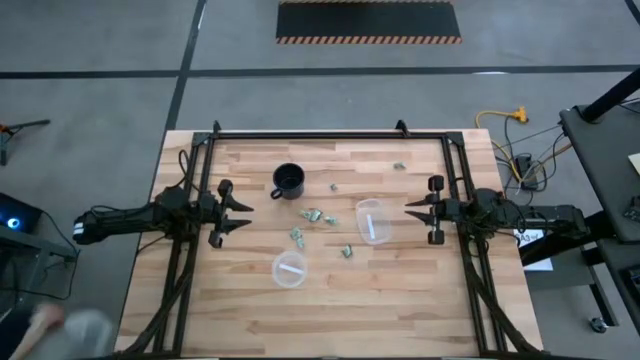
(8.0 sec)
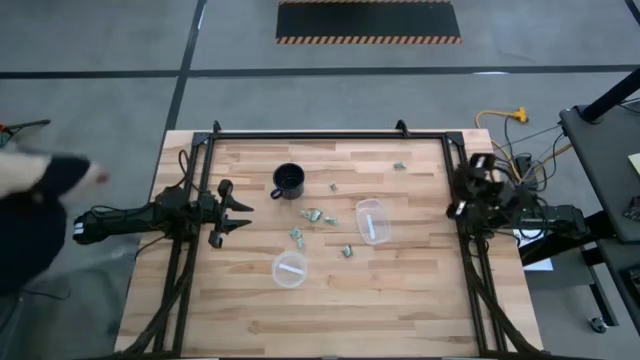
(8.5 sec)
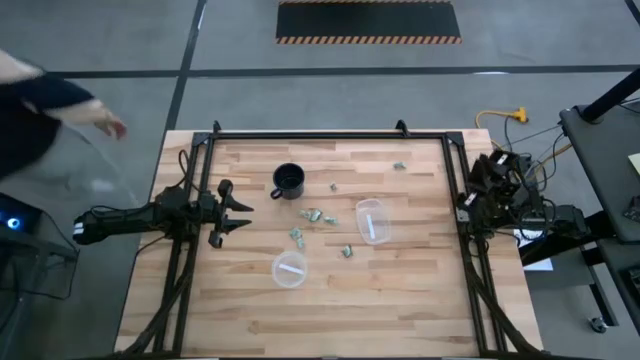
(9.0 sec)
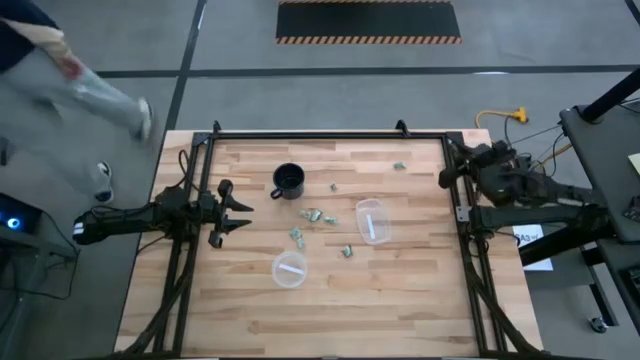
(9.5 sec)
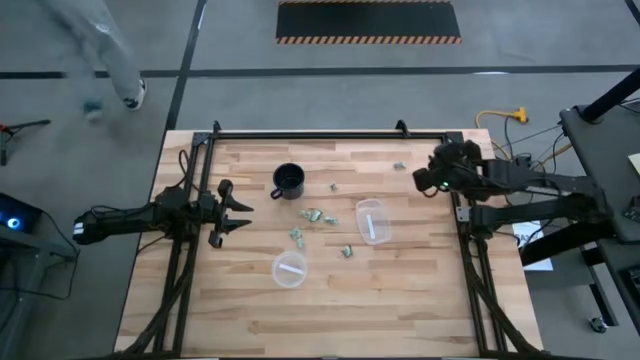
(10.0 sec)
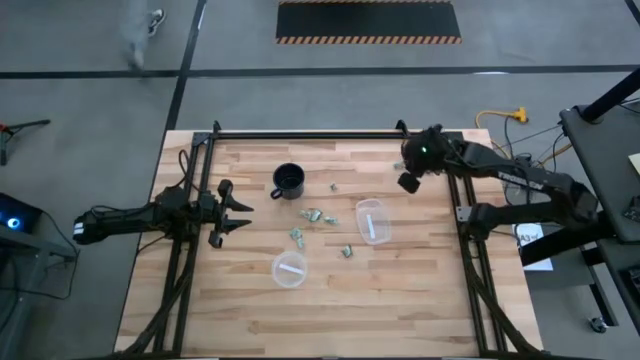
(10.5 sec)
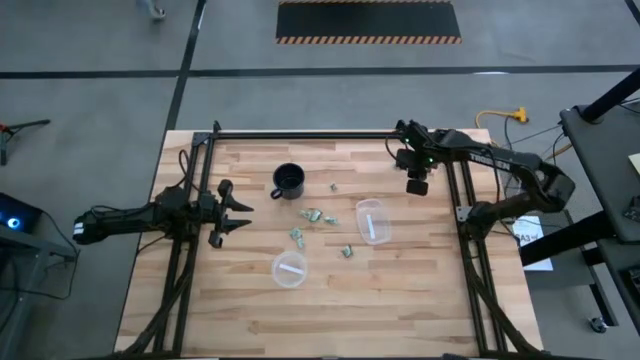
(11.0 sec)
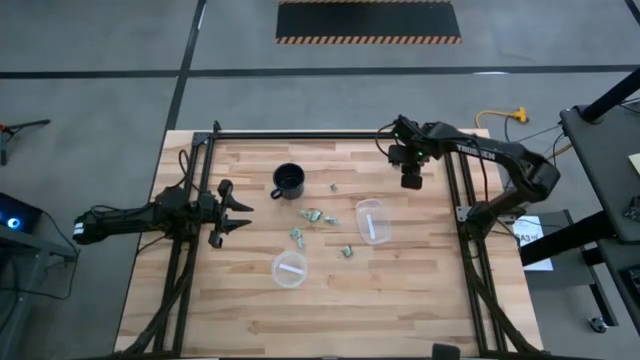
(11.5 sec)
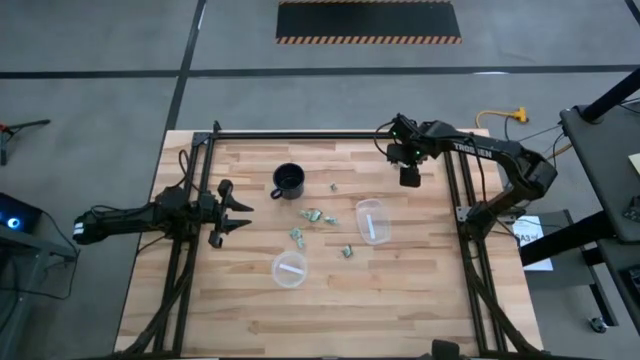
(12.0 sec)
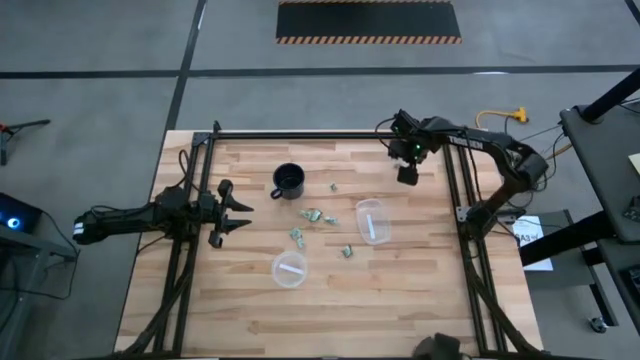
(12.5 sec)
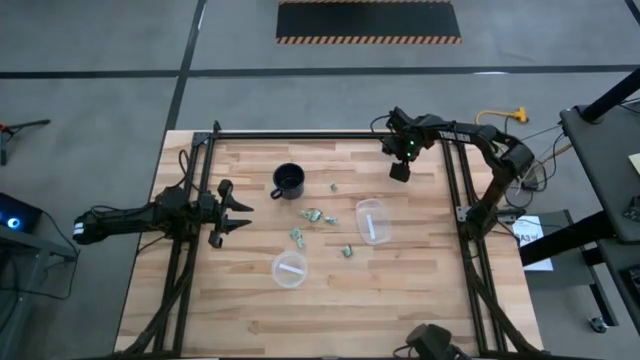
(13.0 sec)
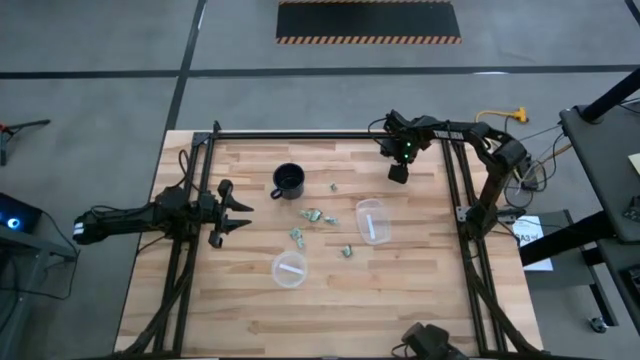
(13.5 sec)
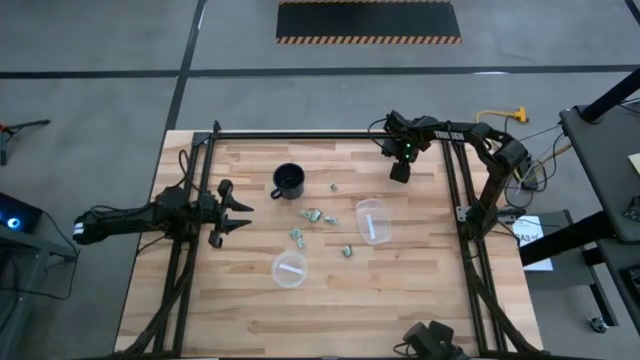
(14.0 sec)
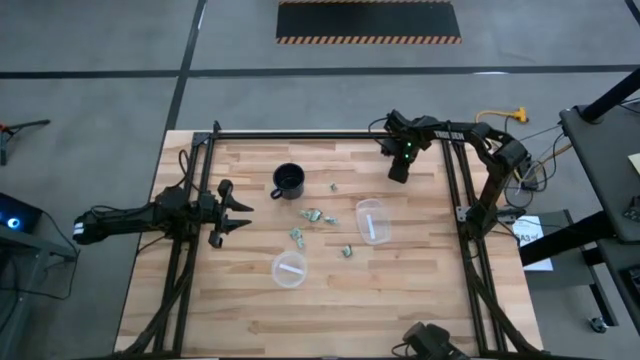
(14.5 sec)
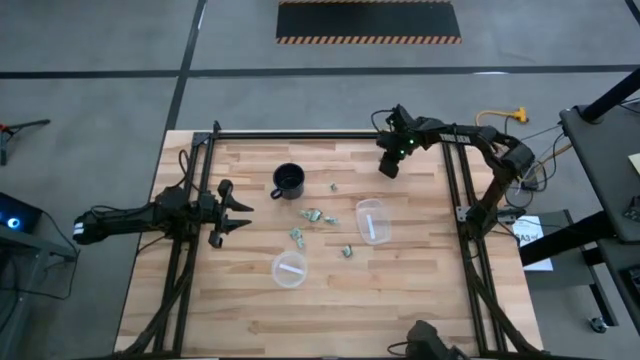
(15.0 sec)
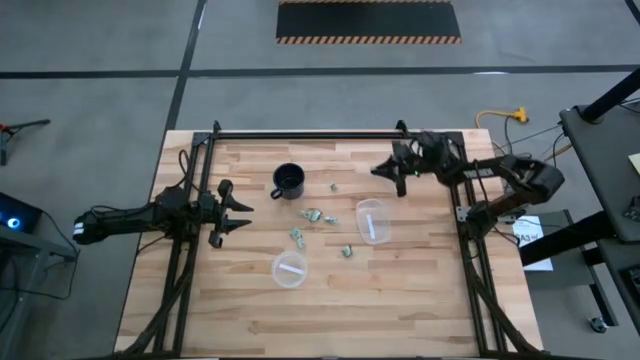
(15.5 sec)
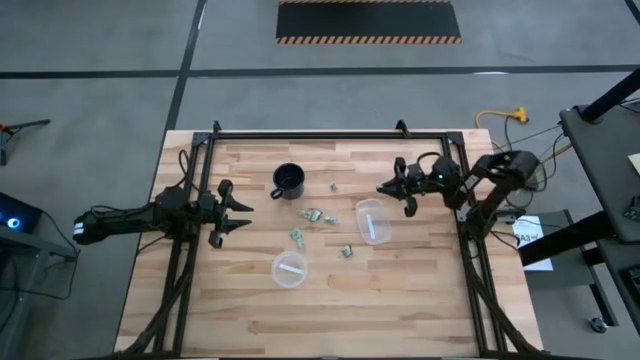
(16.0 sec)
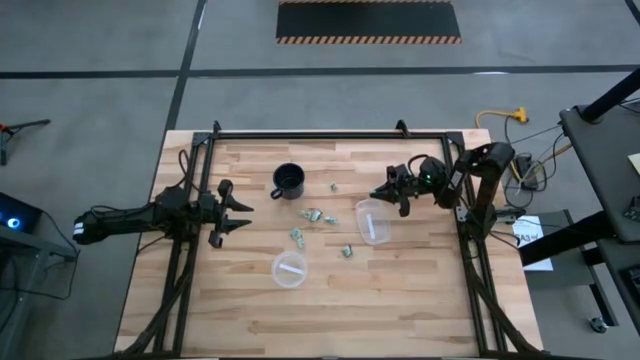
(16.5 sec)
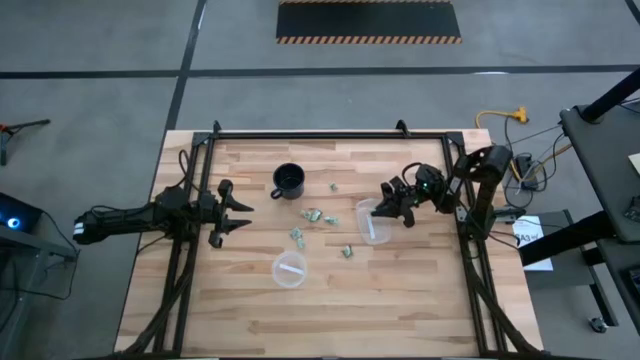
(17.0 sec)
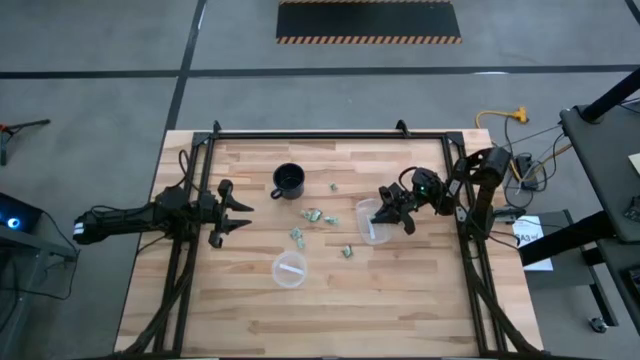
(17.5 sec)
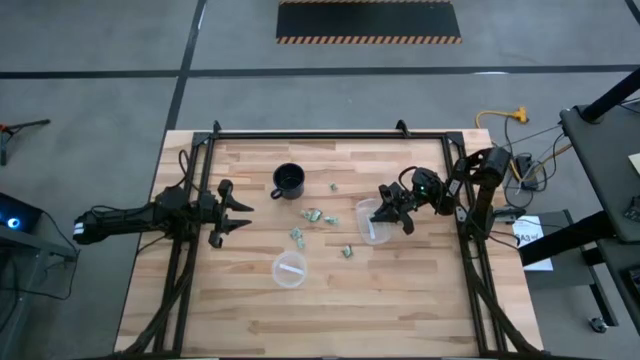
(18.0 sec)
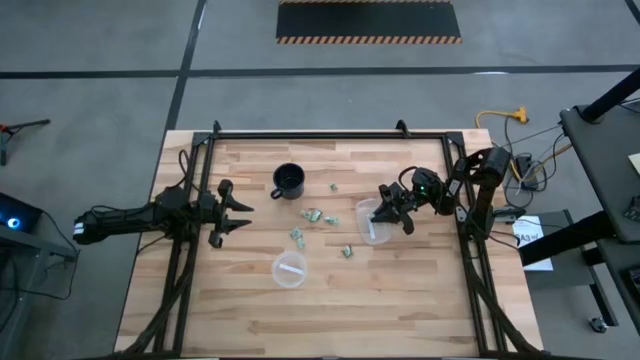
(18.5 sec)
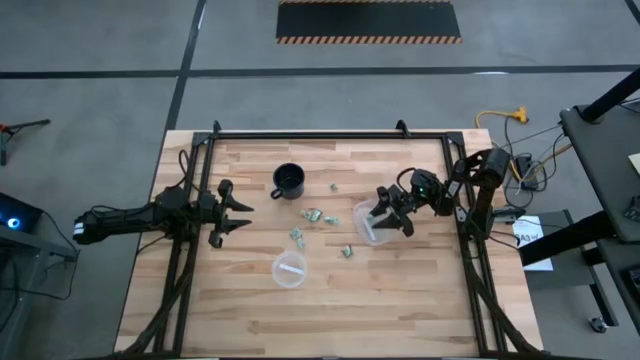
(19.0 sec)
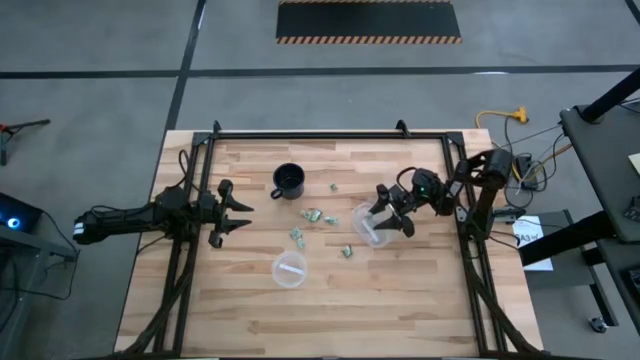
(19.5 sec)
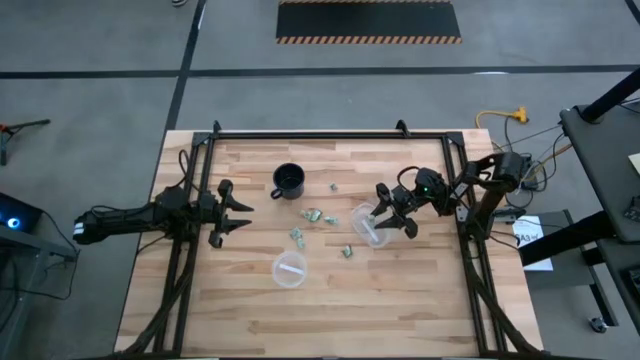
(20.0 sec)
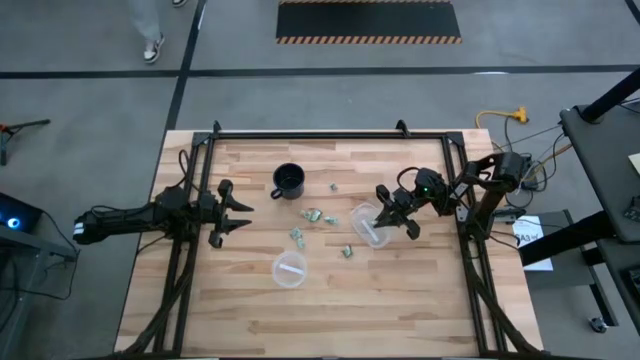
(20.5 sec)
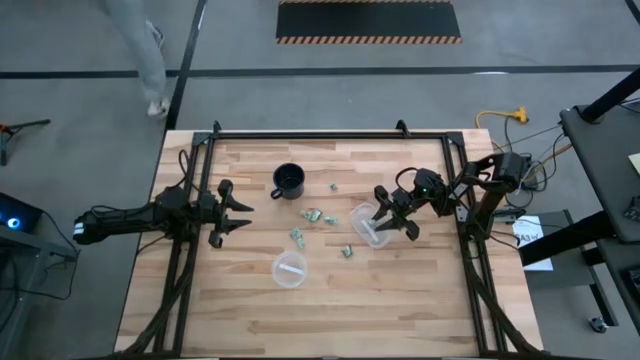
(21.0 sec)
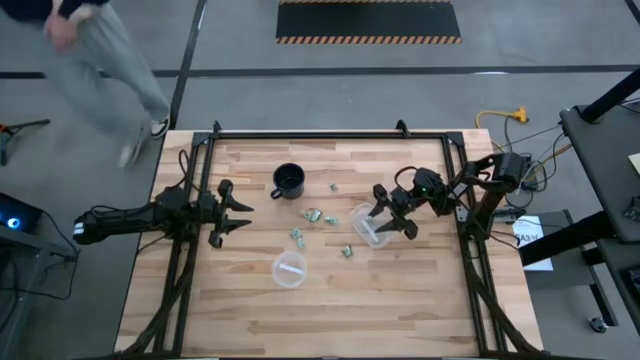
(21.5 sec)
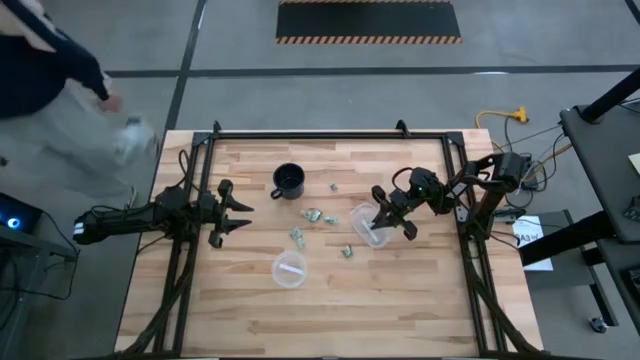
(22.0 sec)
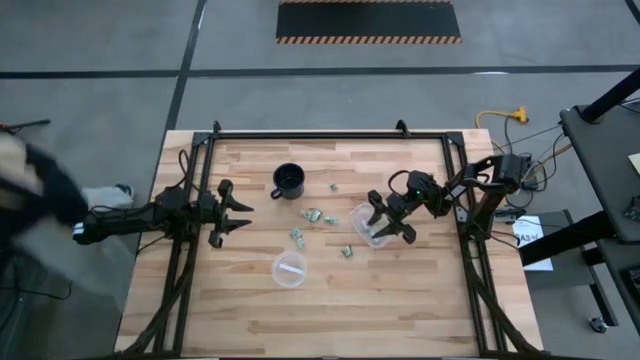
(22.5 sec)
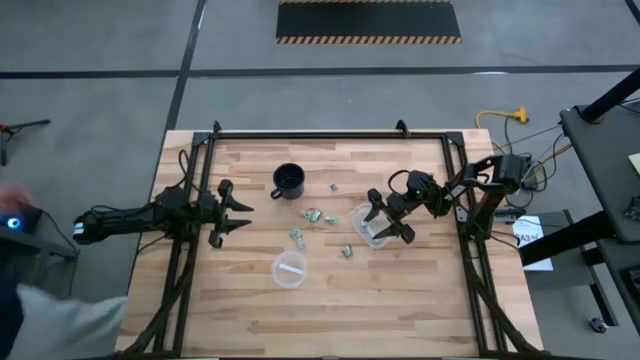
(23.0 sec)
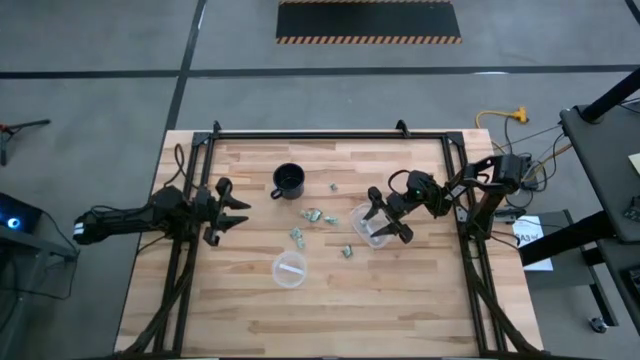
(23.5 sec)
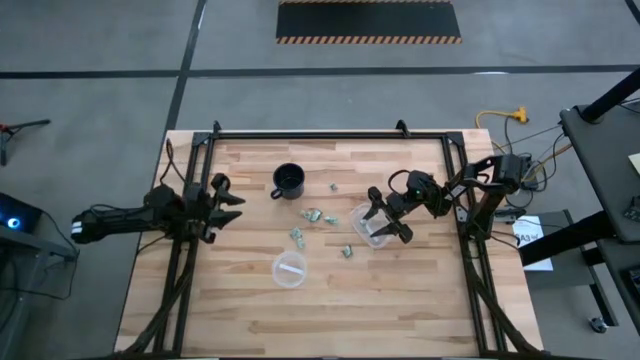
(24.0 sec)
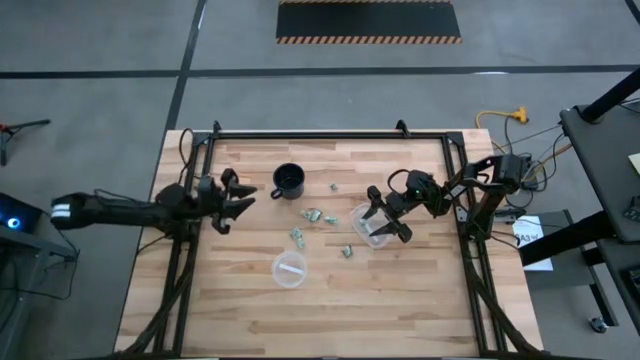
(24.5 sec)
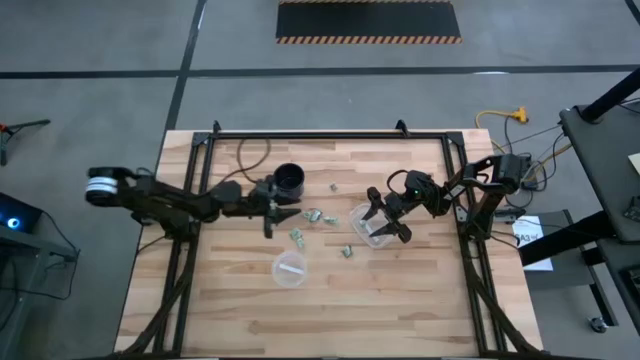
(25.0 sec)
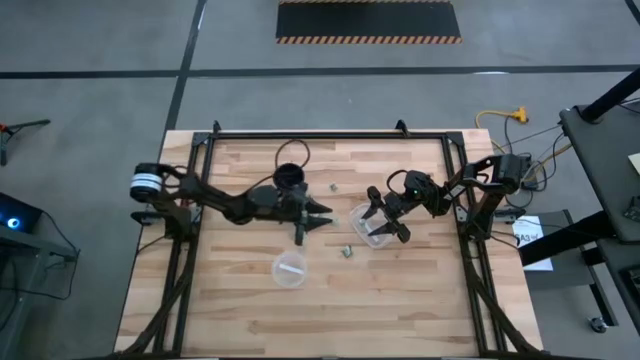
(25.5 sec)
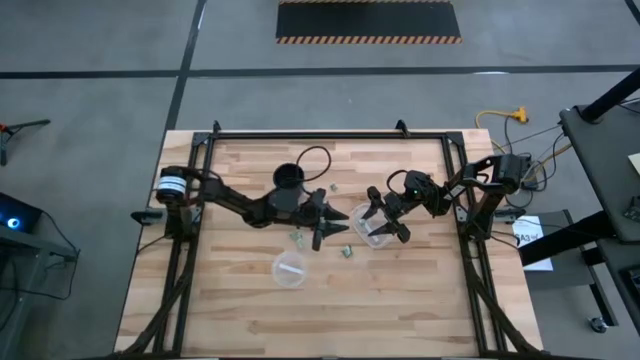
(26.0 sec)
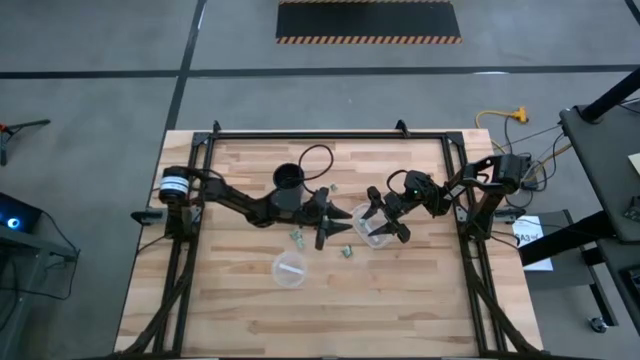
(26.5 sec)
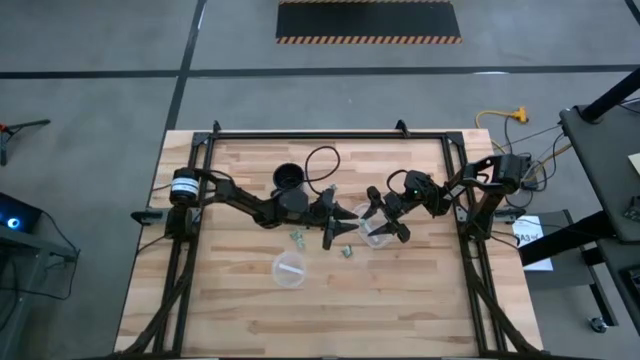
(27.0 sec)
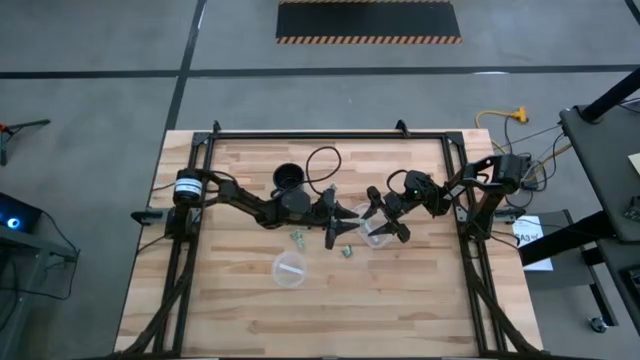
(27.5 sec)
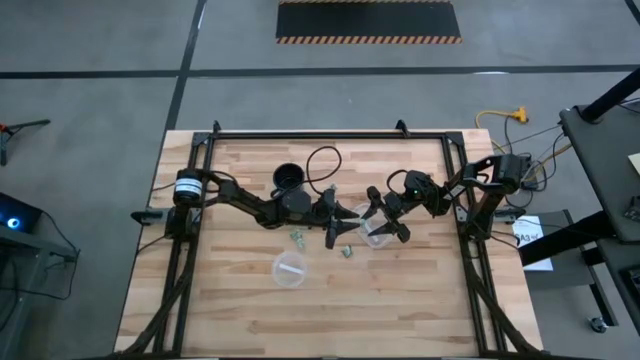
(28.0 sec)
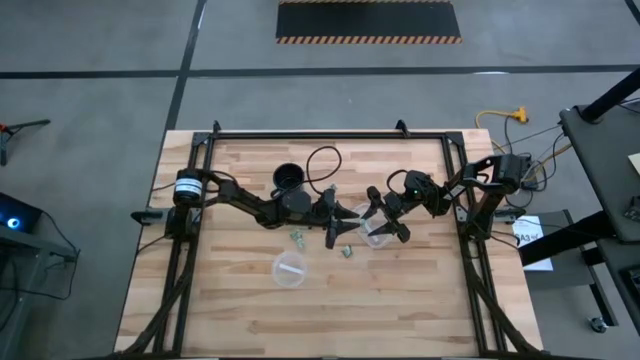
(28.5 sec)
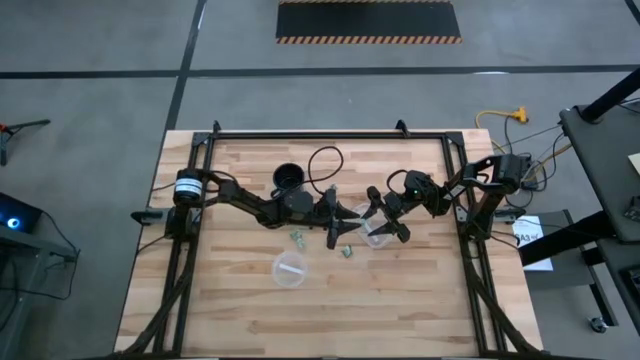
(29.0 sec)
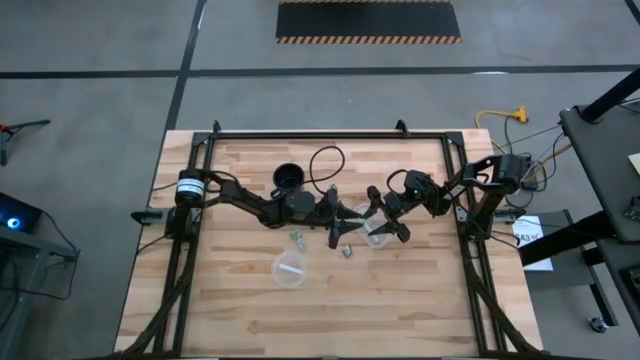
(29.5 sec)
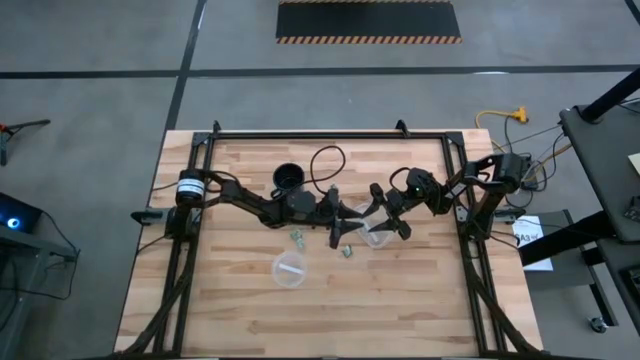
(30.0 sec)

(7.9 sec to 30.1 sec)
Task: Pick and place Stevia / Truvia into bins
Put the white stevia packet into the top transparent container
